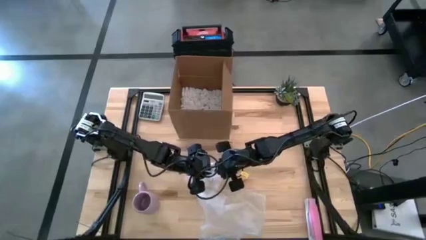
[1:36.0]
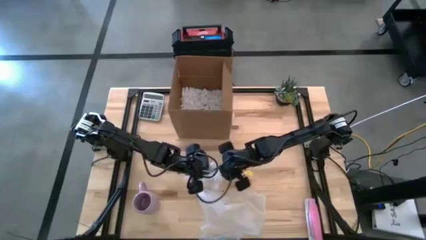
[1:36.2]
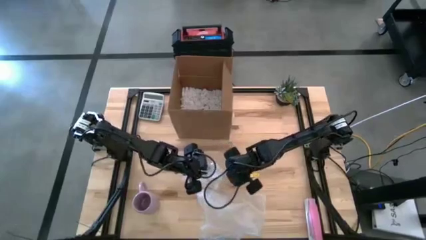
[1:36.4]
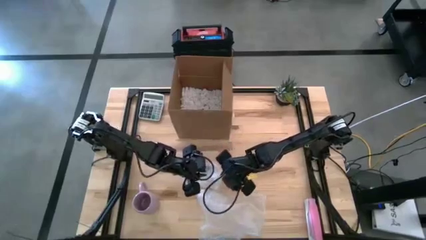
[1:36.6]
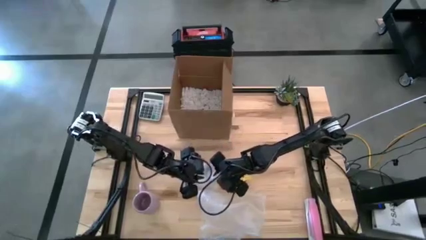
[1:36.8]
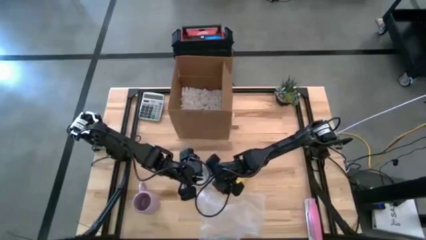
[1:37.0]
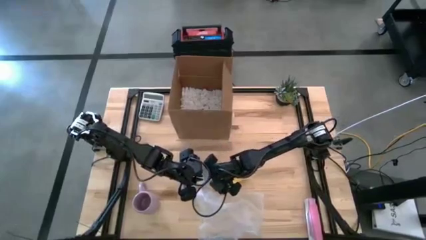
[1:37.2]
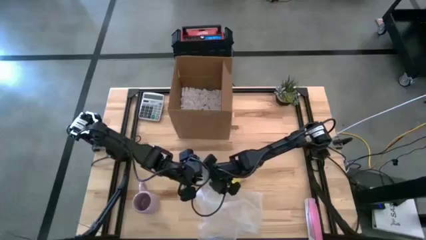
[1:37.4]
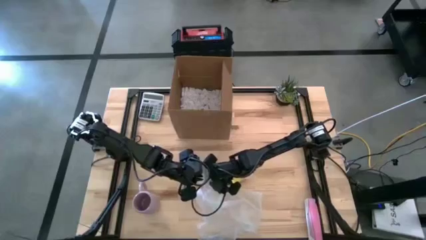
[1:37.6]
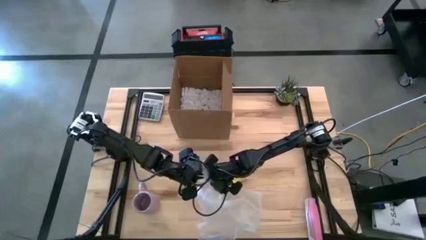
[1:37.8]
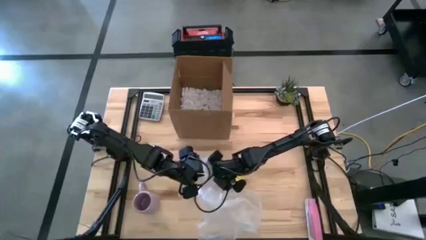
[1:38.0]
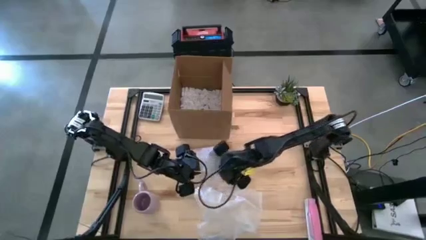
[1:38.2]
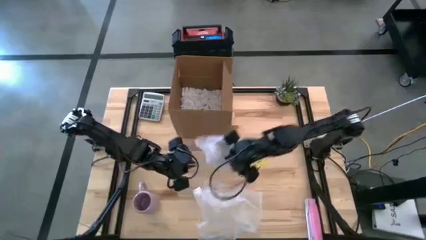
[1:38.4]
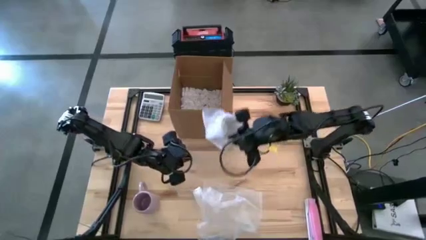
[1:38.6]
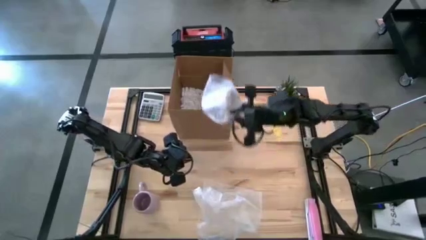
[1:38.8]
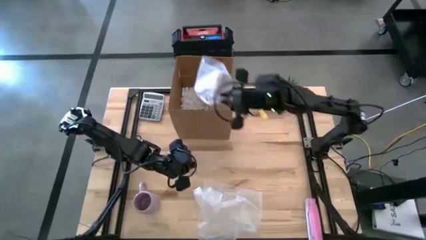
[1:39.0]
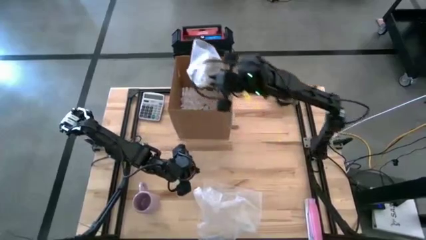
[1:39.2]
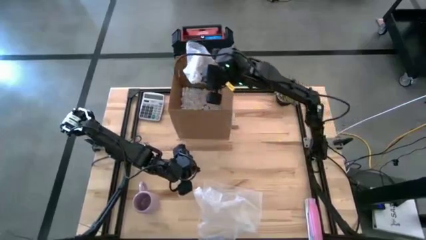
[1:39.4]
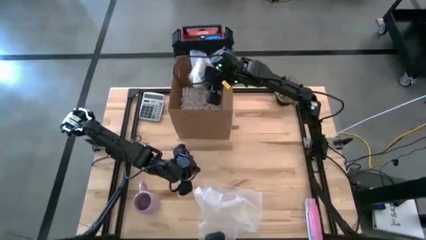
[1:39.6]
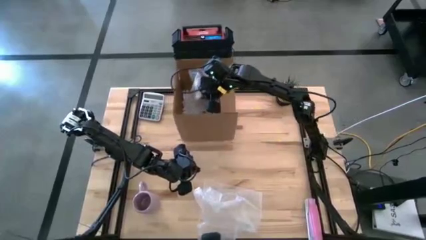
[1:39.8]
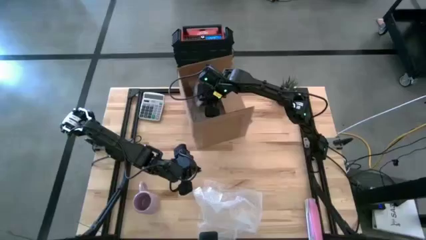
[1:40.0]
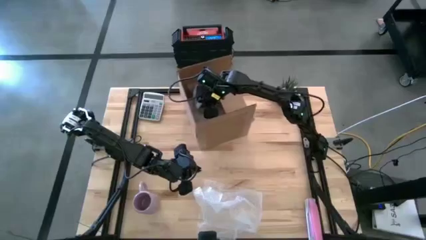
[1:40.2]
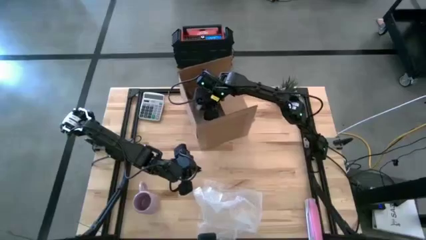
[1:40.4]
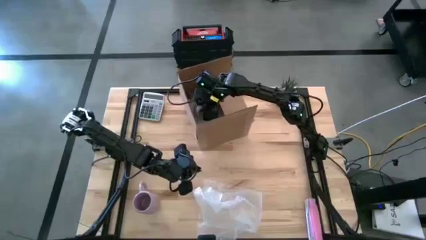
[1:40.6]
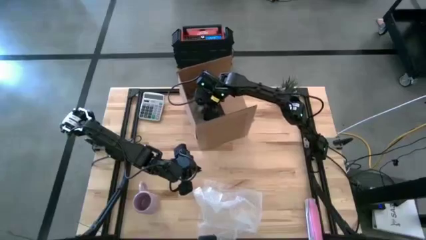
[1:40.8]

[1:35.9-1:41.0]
Task: wrap mug
Put the wrapped white mug into the cardboard box

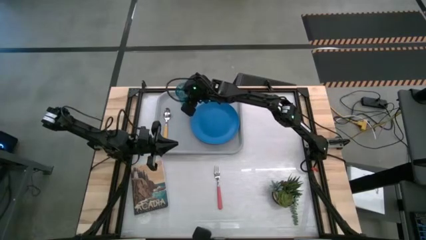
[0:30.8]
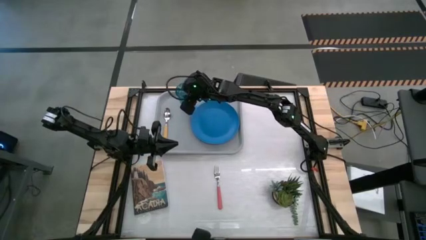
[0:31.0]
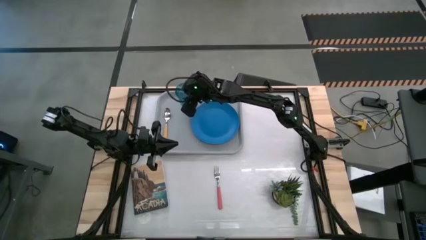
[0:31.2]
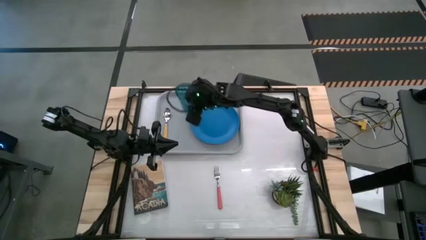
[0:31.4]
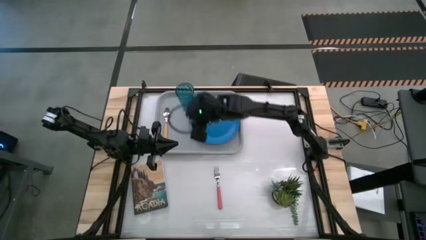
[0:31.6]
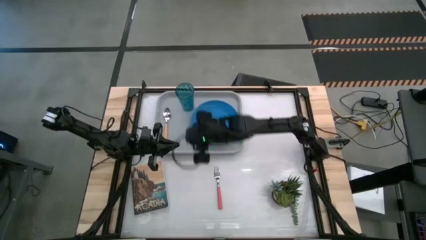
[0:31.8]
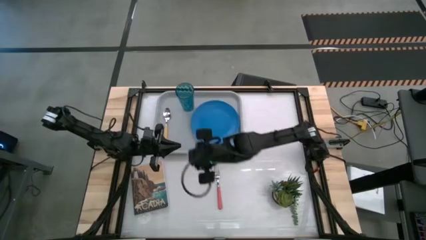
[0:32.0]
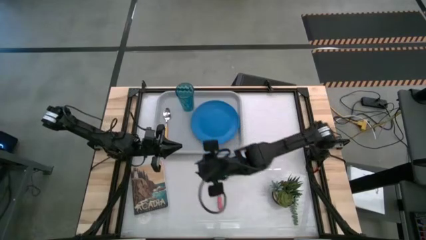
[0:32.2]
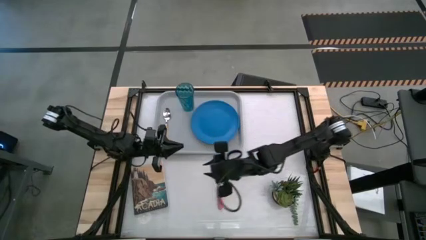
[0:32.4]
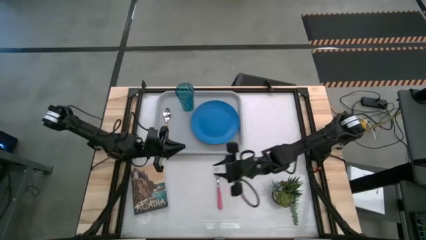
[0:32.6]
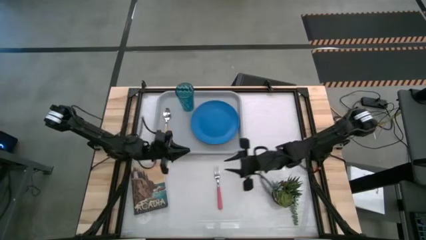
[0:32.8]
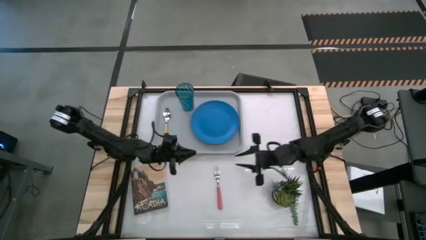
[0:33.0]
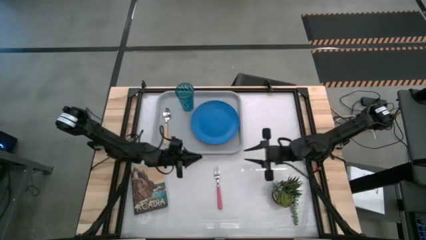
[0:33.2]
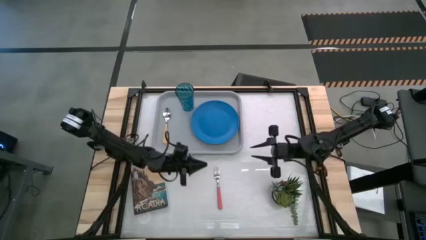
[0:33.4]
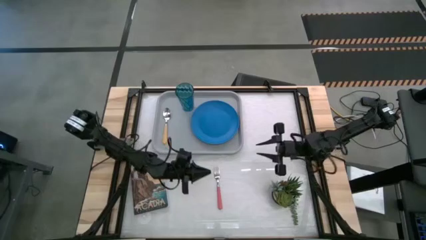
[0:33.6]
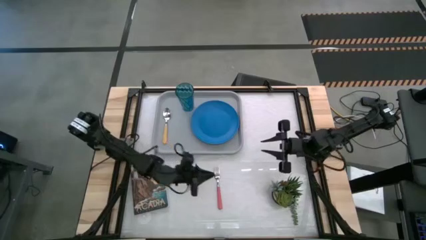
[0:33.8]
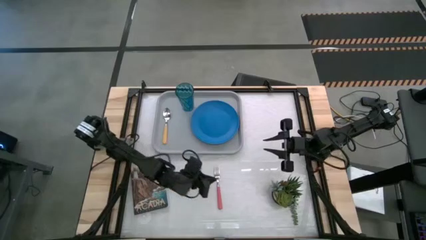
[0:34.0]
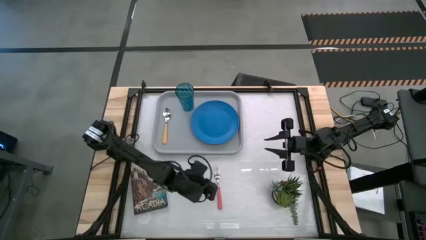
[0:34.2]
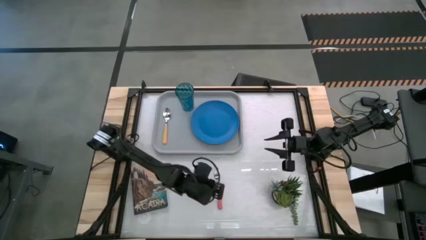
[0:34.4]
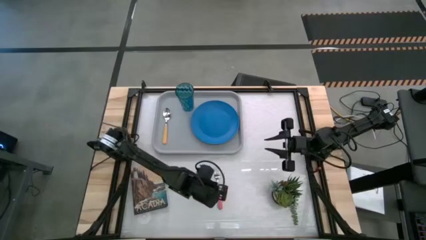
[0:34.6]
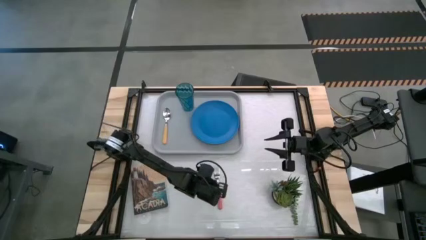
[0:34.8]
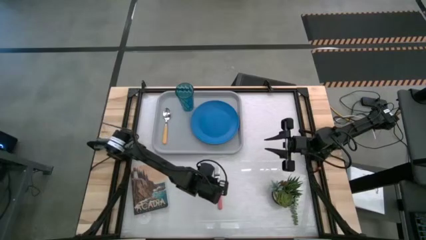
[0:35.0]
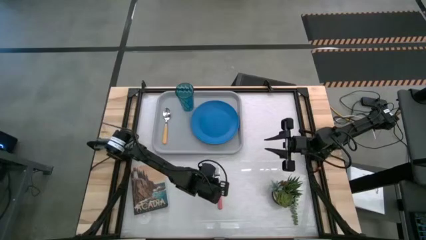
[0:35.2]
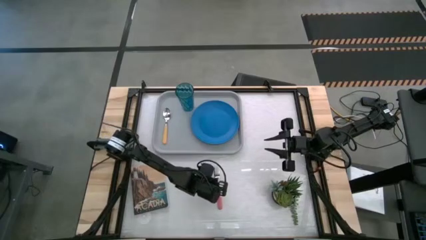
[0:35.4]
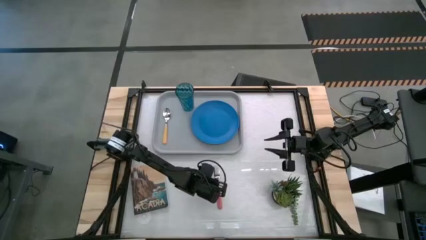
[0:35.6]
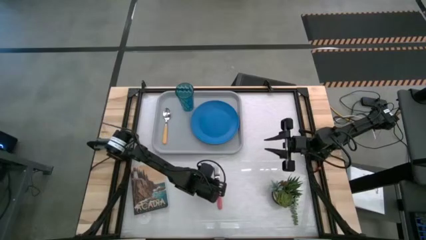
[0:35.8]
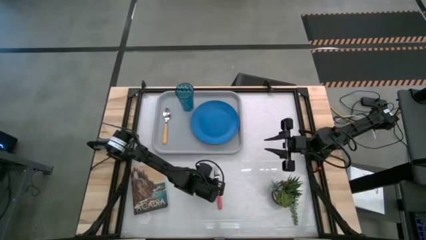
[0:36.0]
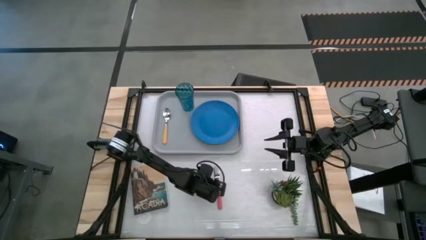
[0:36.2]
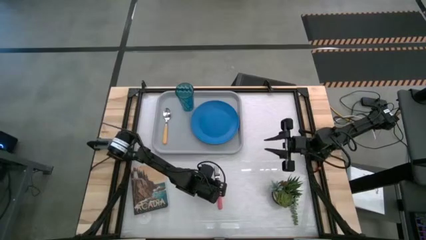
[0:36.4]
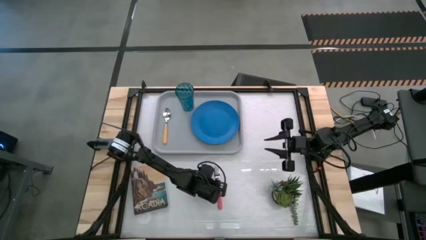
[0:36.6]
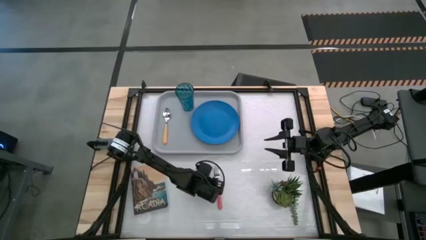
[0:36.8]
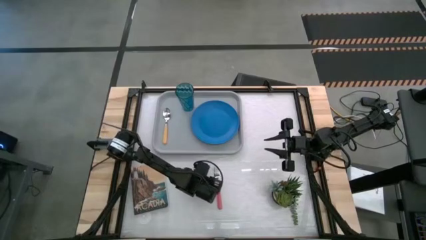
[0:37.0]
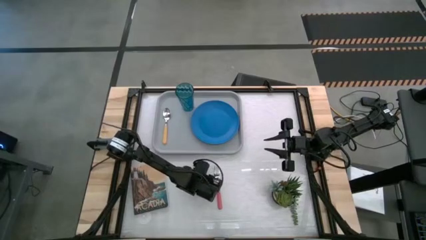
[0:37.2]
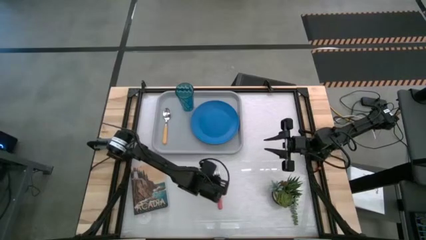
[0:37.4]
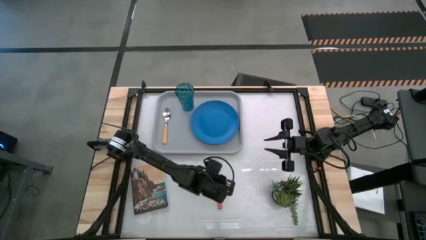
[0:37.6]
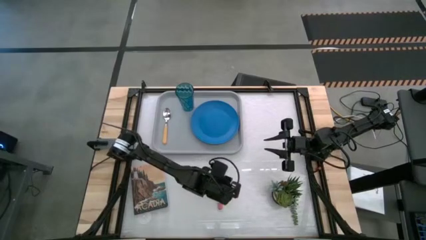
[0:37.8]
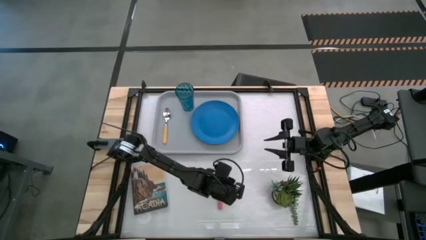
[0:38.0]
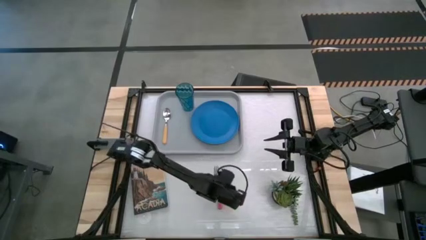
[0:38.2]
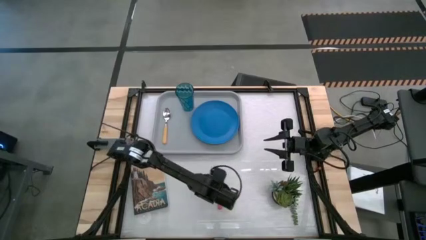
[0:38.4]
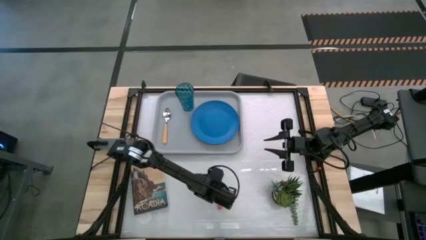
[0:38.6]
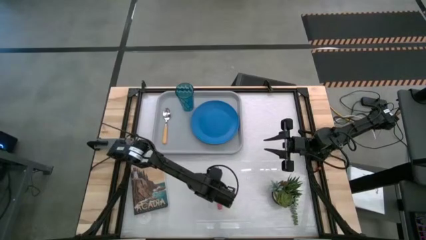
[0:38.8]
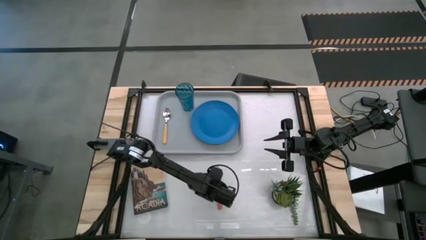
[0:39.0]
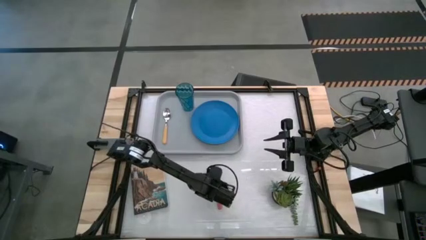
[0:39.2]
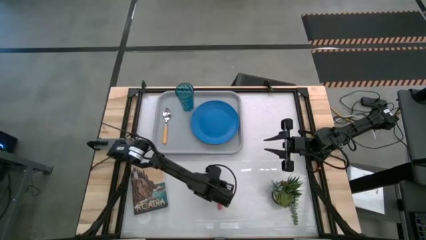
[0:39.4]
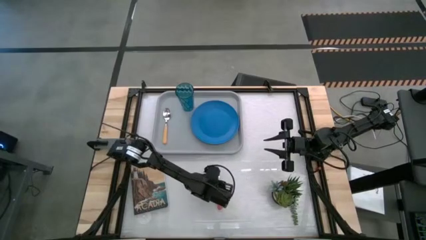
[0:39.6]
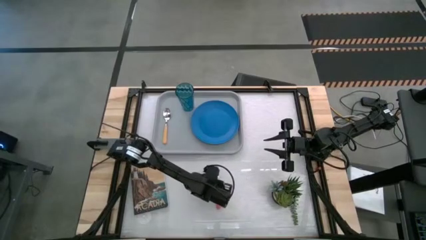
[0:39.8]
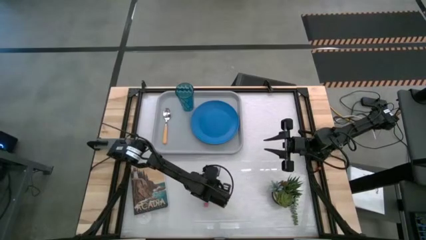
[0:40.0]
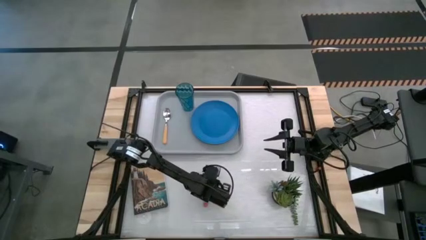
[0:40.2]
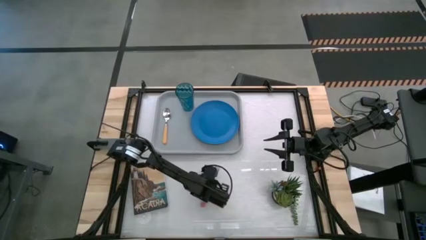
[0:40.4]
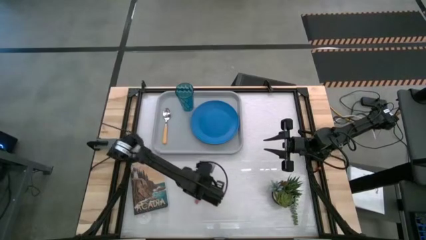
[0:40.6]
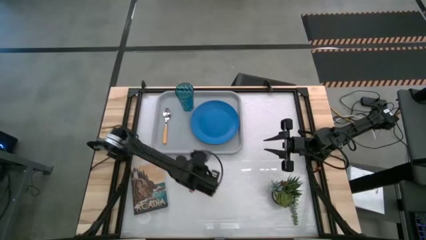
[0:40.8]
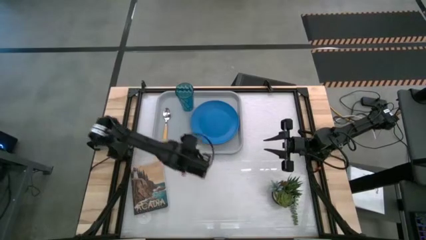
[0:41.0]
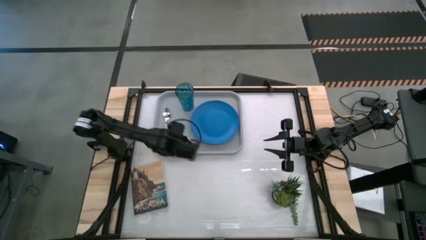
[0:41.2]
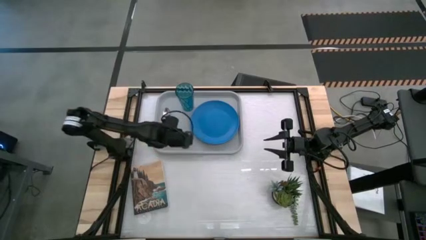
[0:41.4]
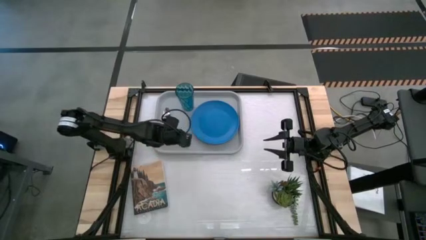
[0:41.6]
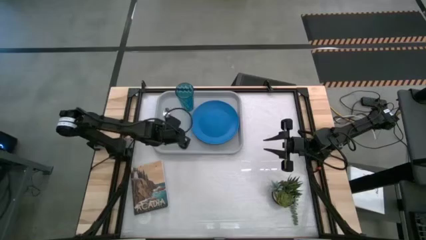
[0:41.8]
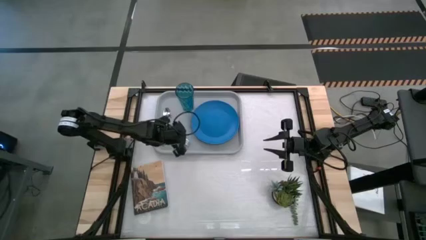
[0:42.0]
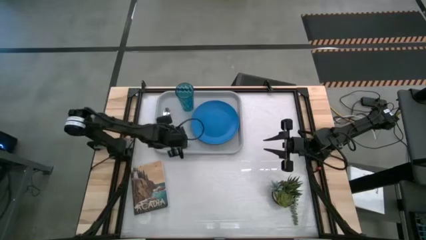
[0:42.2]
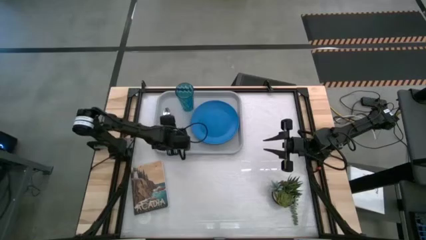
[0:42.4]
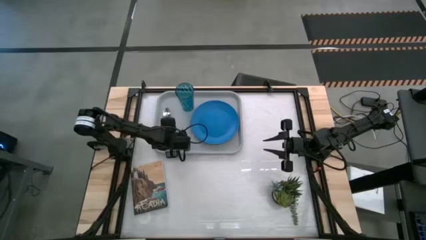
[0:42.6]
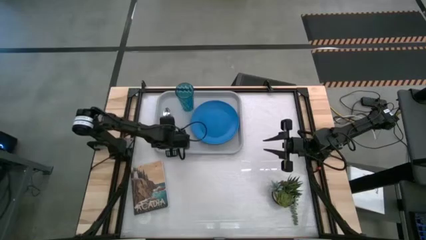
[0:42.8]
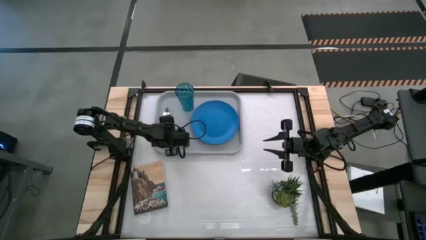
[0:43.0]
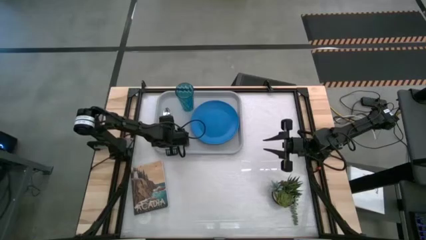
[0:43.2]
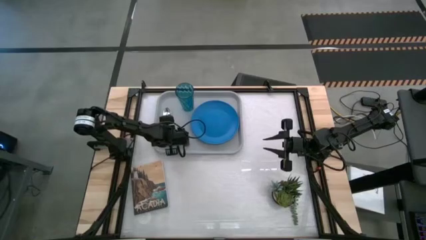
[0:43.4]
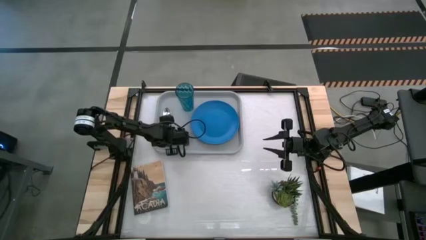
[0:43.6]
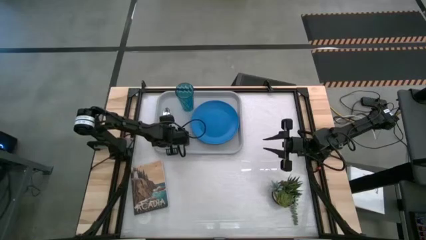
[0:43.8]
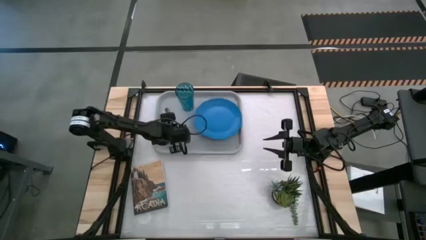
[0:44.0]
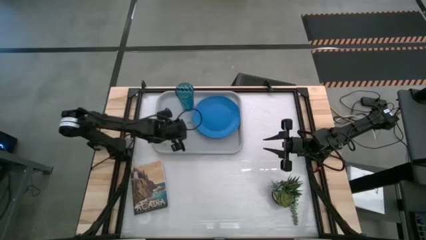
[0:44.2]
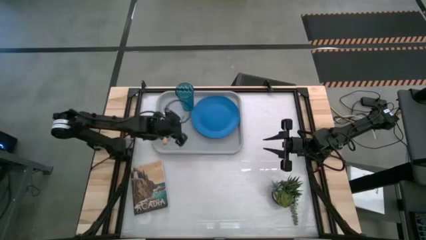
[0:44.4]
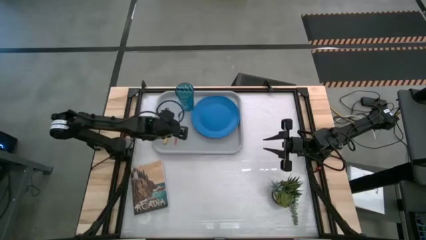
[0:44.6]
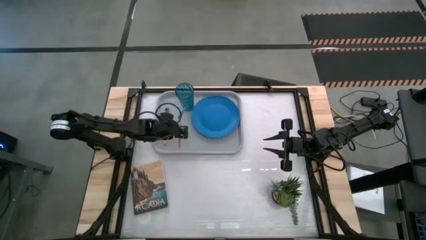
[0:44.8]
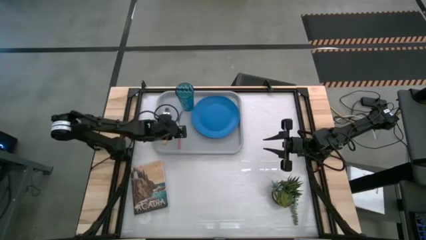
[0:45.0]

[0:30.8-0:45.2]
Task: Pick and place plate/cup/fork/spoon on tray
Put the pink fork on the gray serving tray to the right of the yellow spoon
